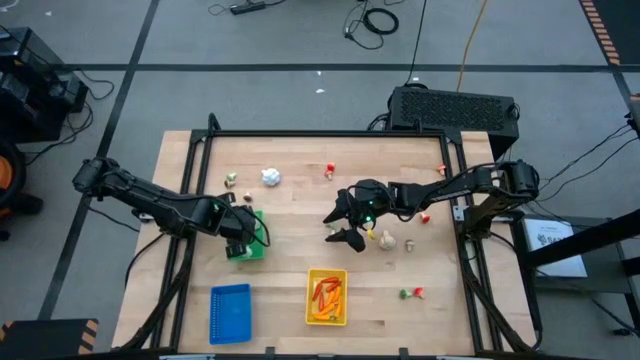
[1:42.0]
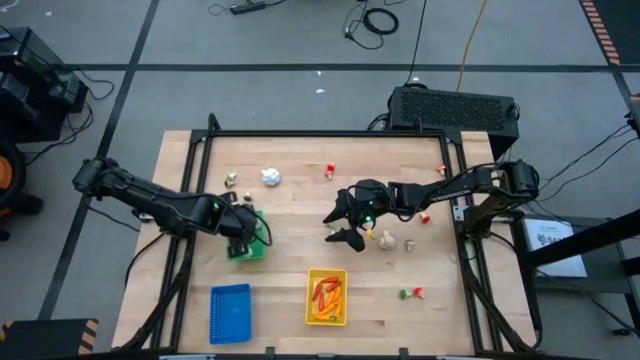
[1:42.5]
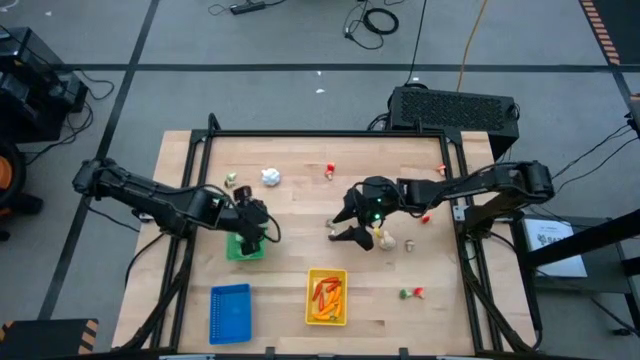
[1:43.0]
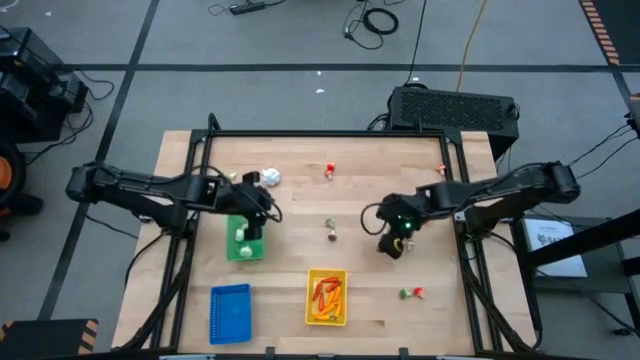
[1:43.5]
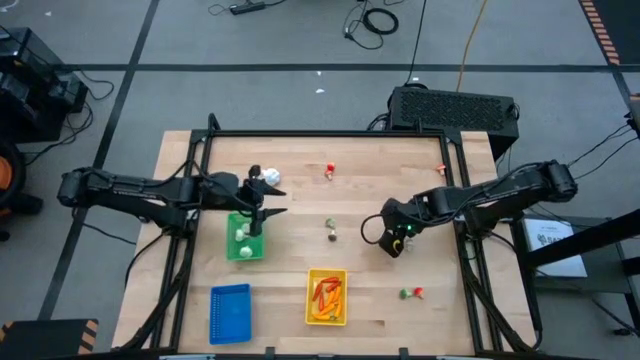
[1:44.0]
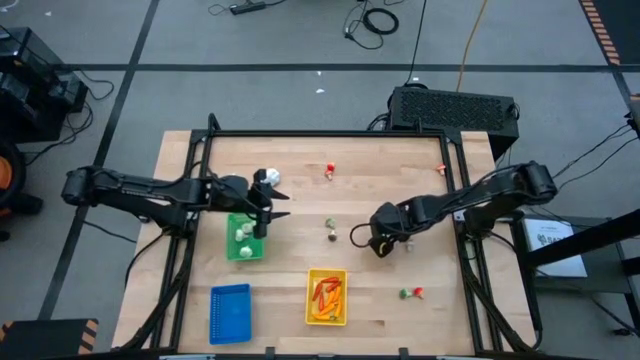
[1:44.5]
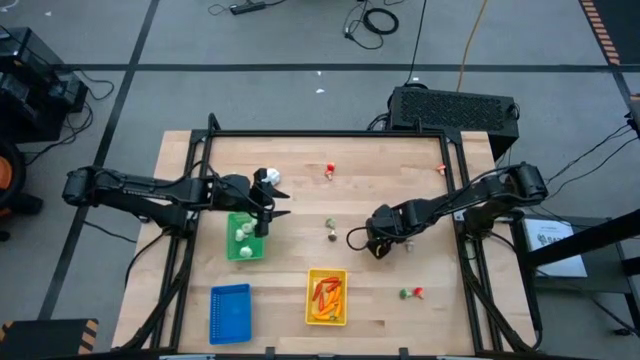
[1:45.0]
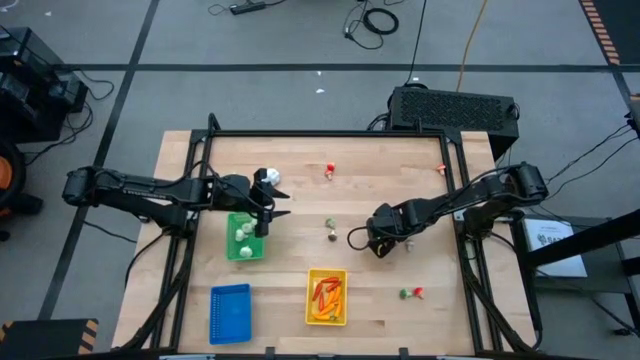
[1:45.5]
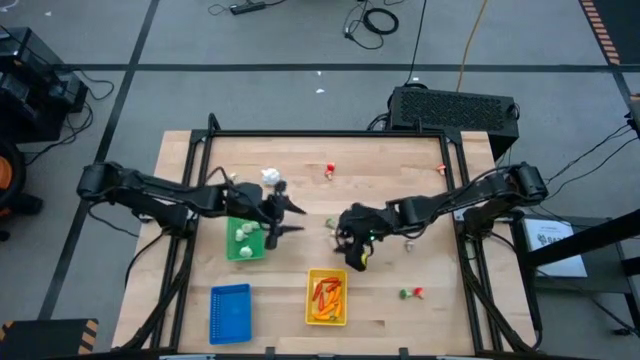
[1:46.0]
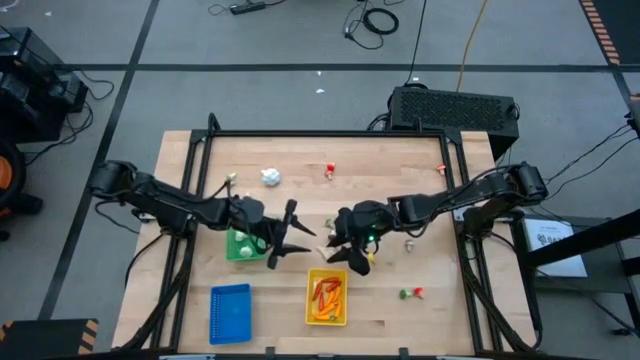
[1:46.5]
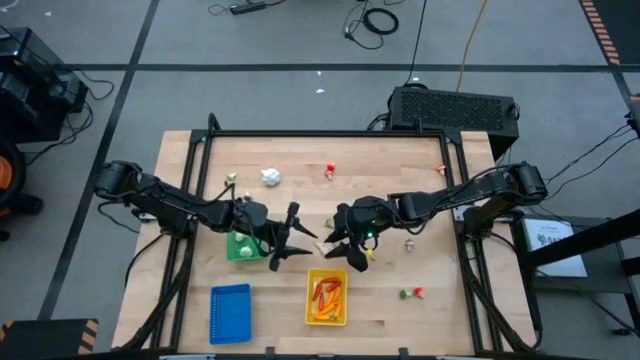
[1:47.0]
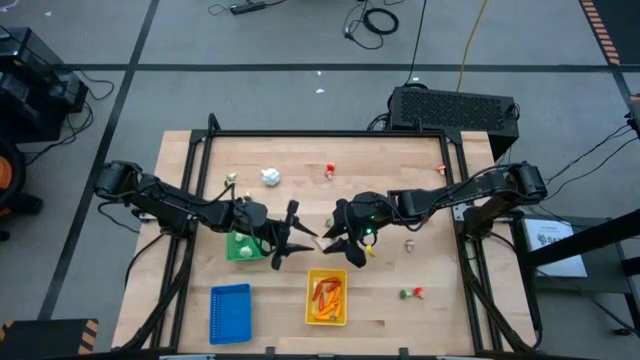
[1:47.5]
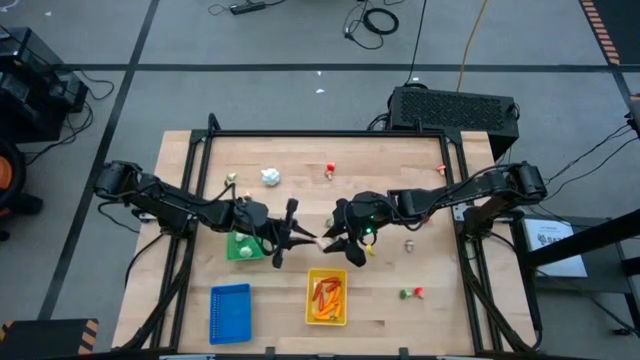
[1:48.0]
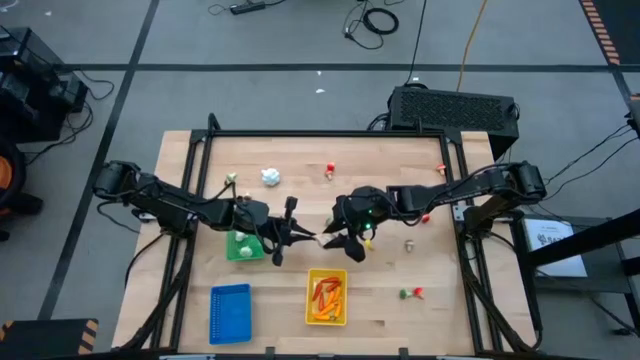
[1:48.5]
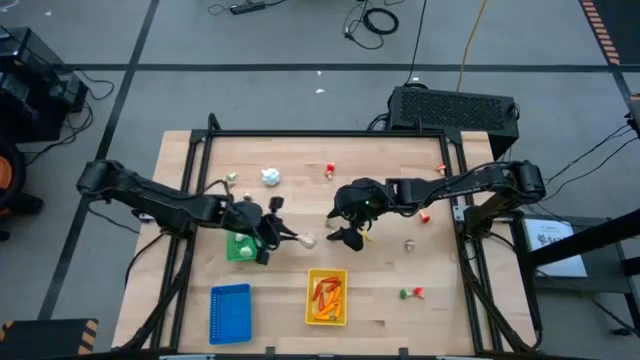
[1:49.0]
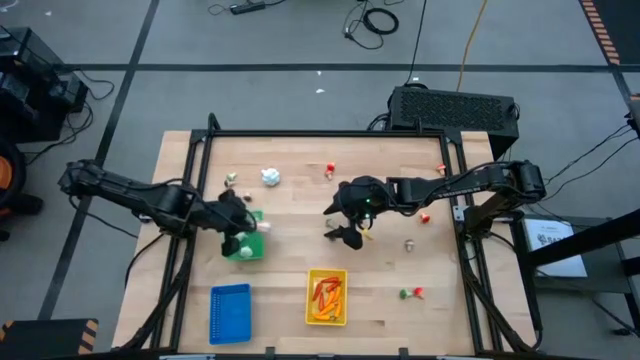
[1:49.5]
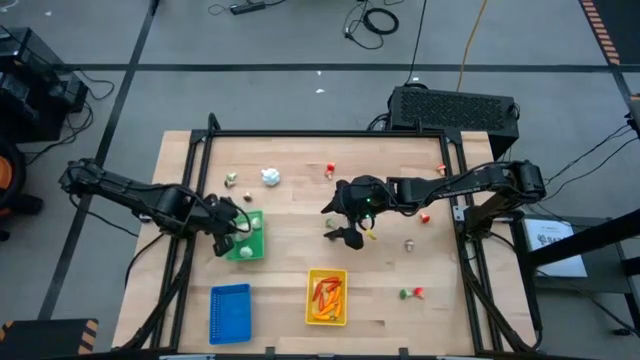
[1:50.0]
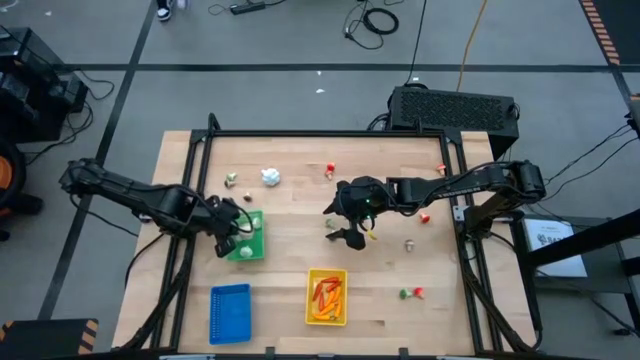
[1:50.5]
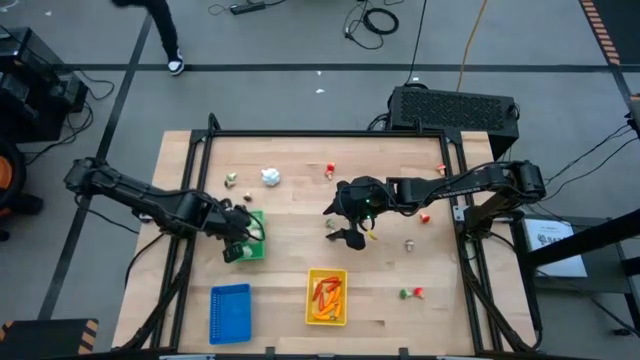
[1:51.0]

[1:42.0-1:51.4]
Task: Sort produce into baskets
Put the garlic into the green basket

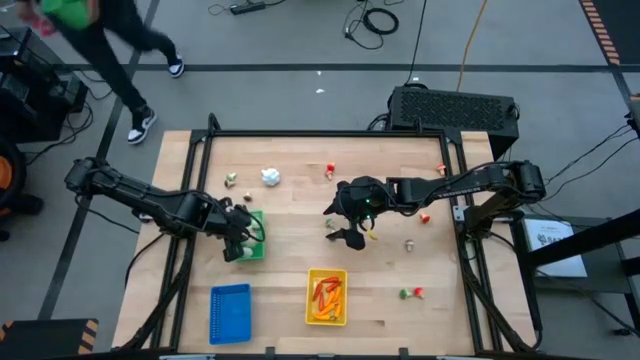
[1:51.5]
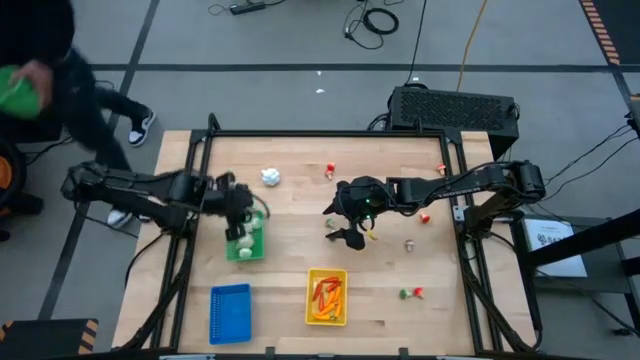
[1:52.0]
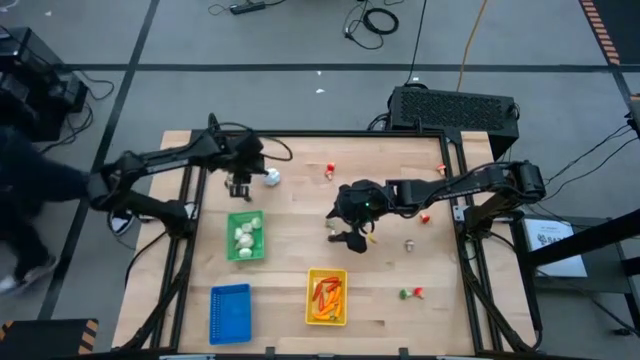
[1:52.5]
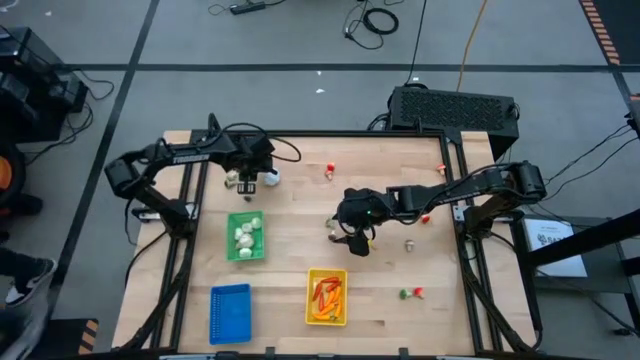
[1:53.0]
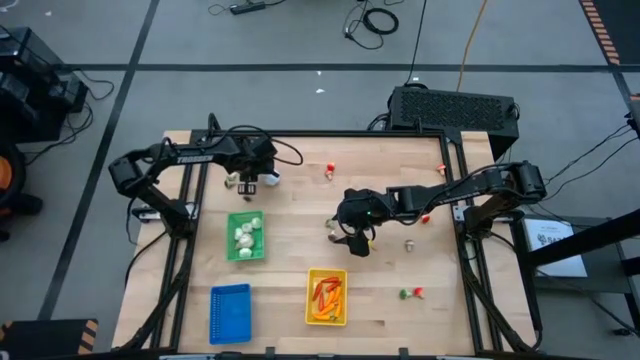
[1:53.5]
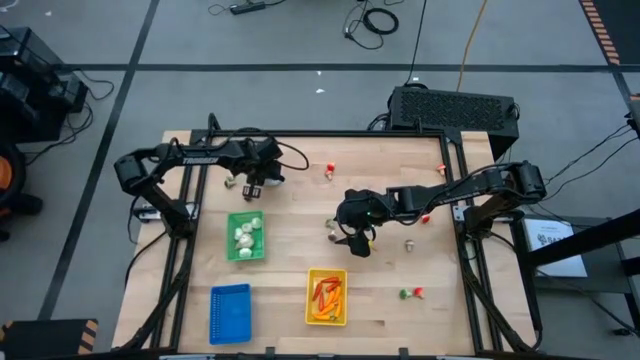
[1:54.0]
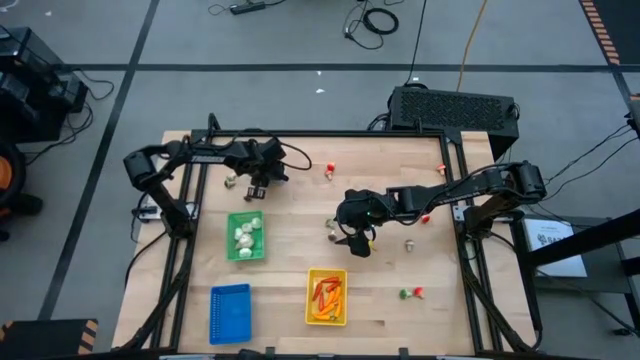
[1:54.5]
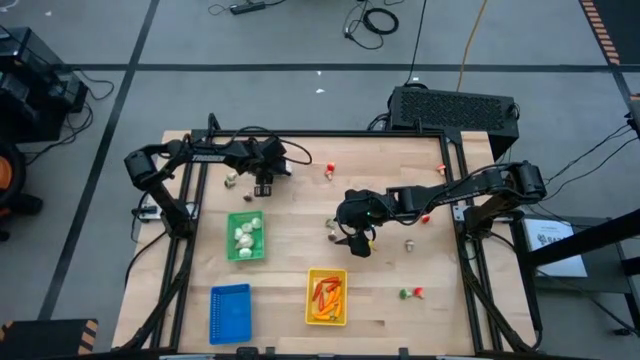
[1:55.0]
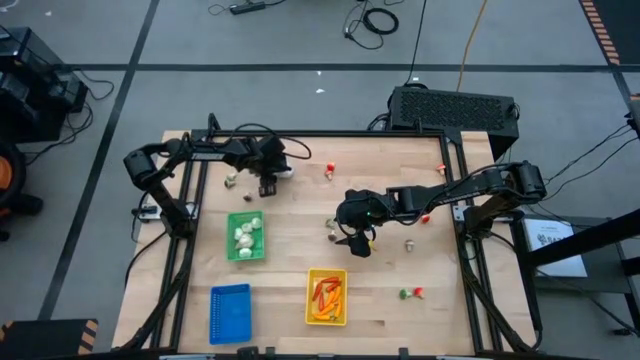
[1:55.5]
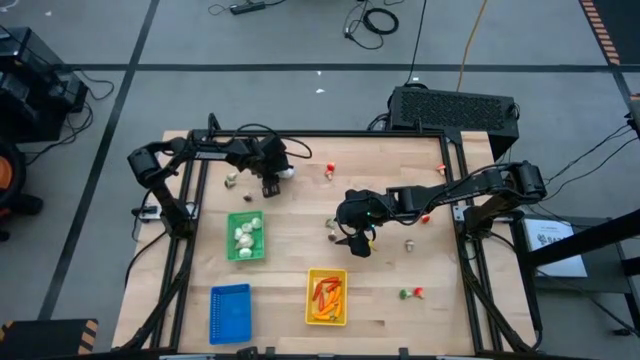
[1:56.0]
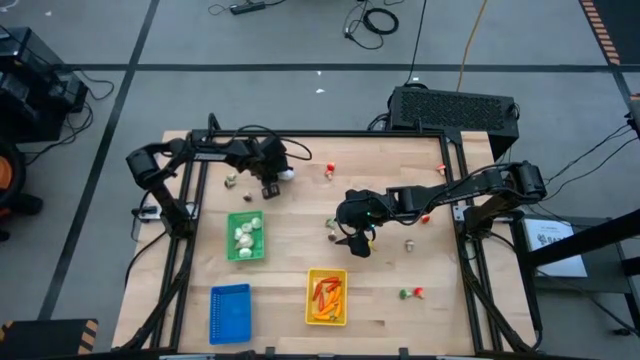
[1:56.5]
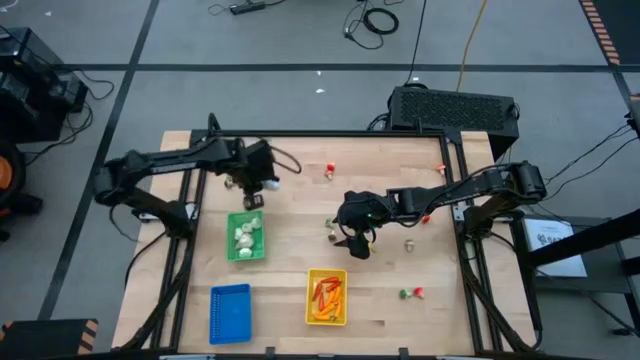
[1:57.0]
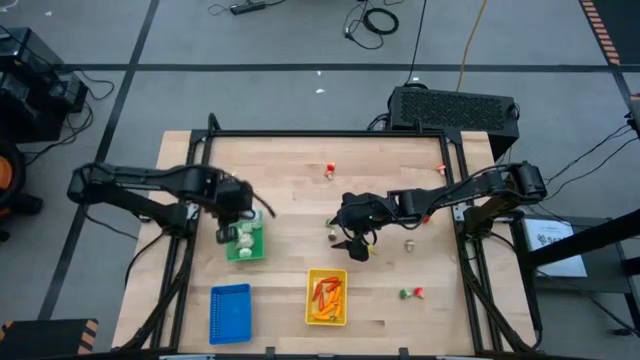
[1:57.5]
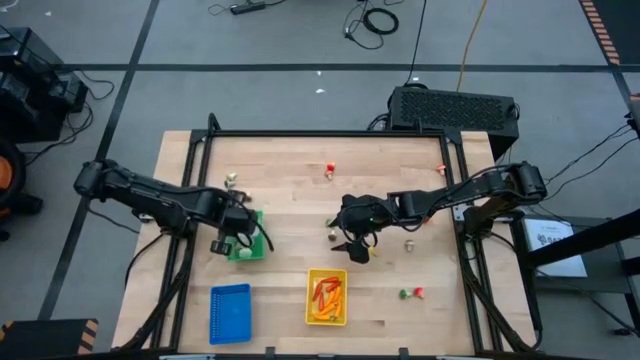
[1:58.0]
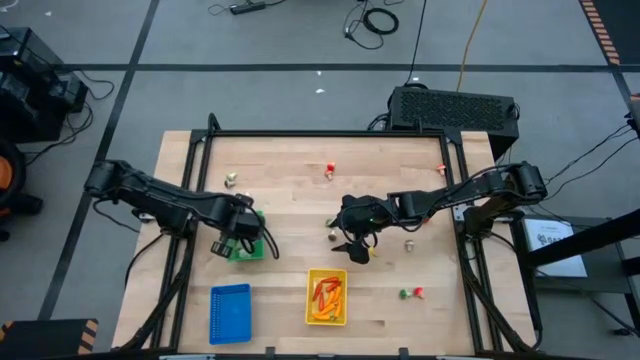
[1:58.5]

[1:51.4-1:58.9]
Put the garlic into the green basket

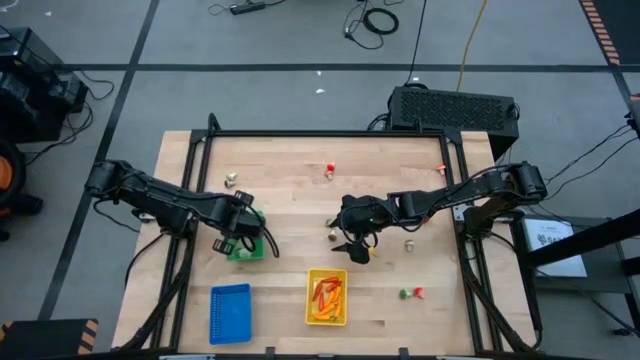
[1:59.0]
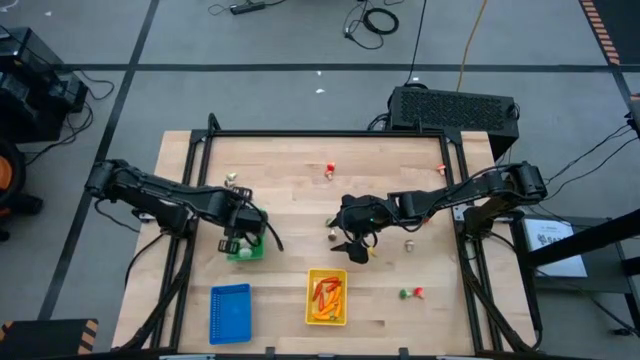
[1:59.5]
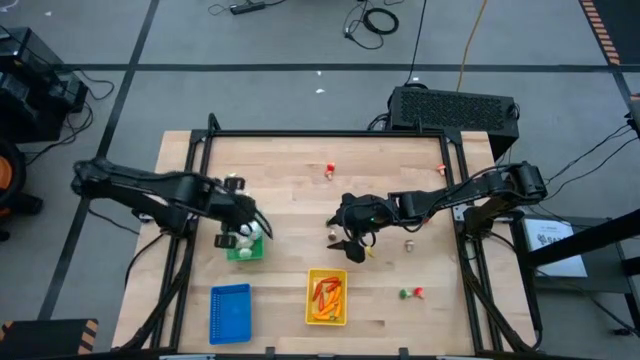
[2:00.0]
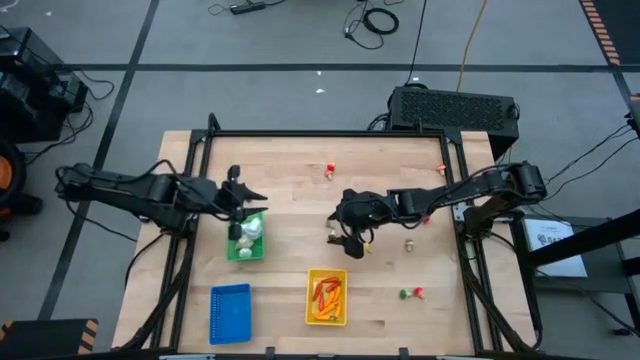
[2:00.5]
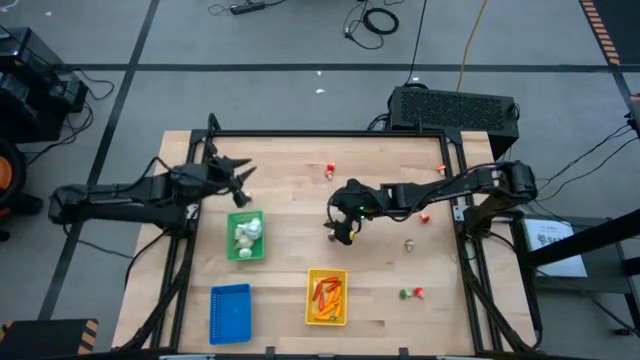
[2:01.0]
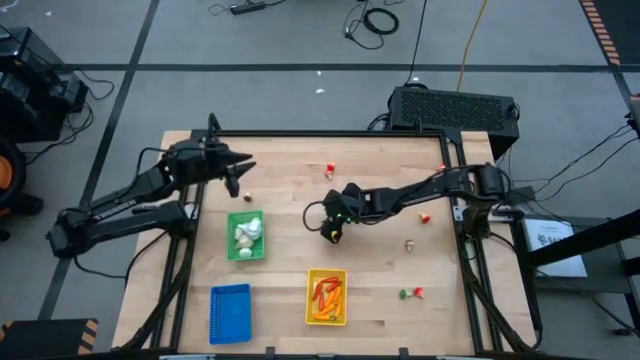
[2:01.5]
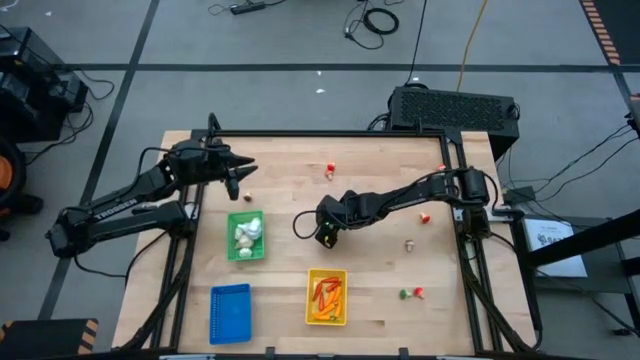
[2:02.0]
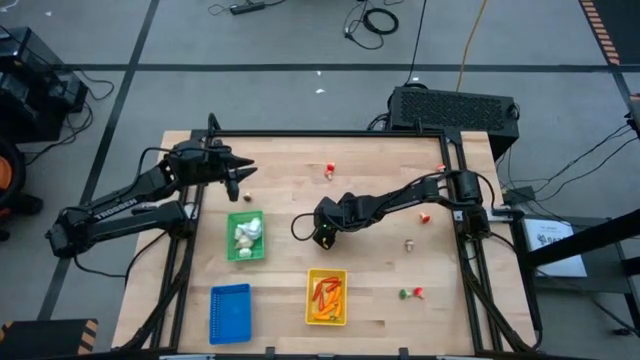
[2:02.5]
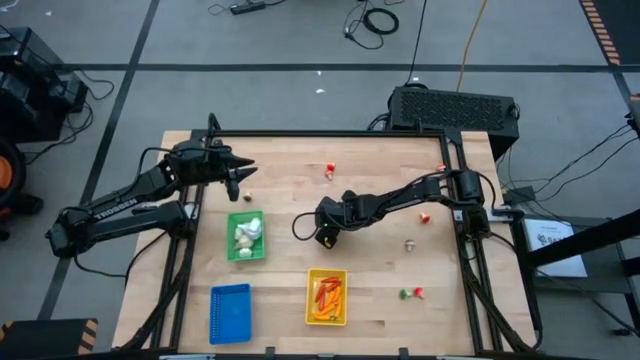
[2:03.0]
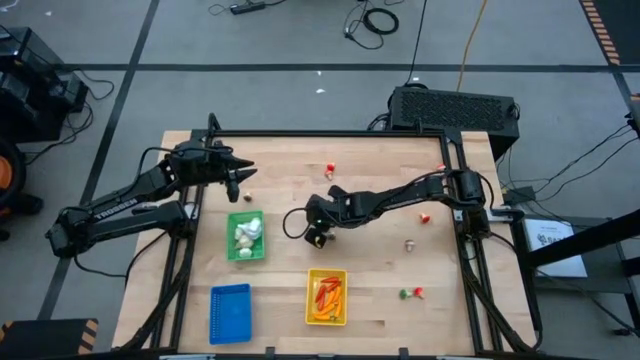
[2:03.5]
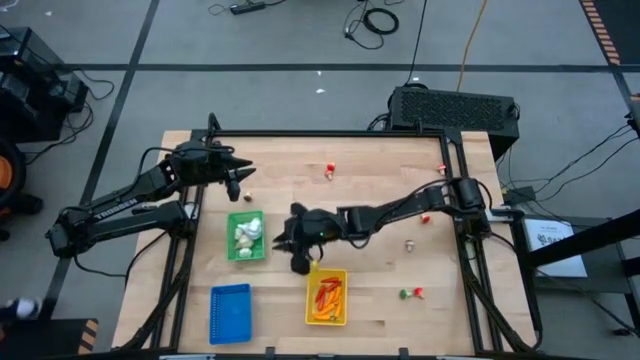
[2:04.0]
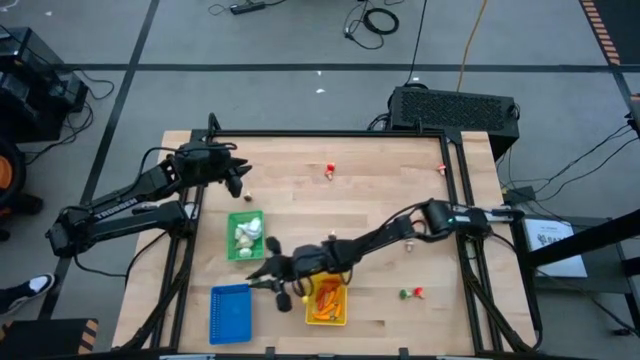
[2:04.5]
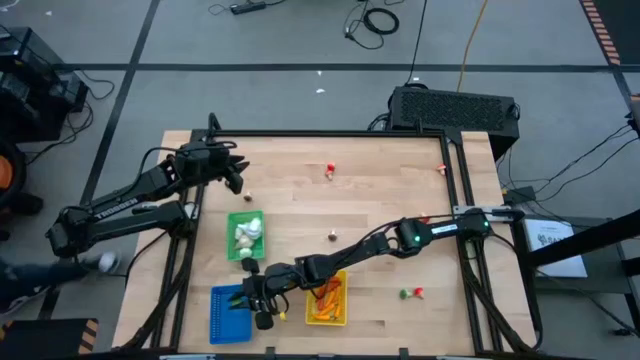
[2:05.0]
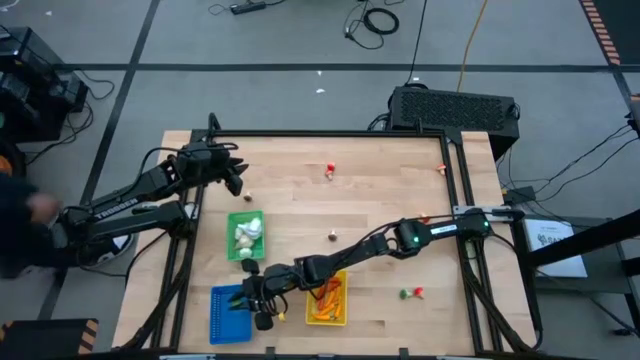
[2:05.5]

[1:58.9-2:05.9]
Put the green mushroom into the blue basket
